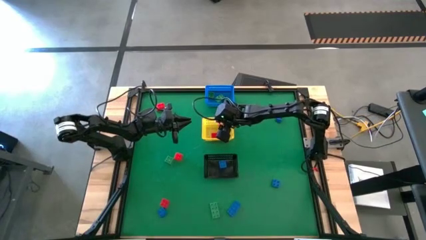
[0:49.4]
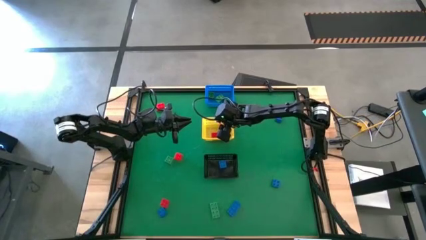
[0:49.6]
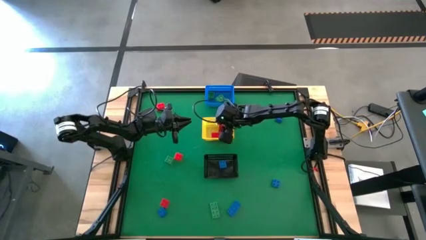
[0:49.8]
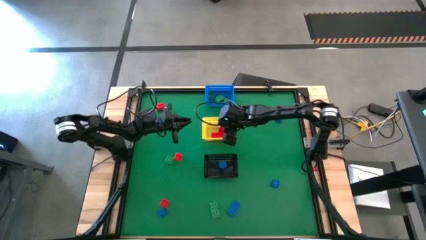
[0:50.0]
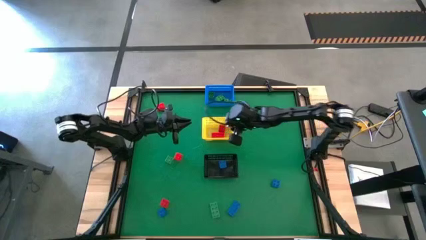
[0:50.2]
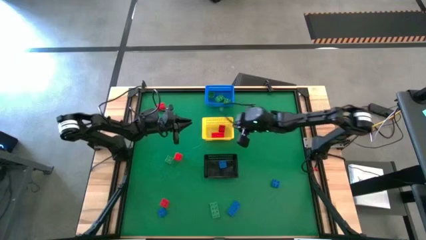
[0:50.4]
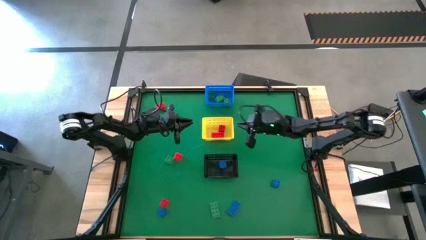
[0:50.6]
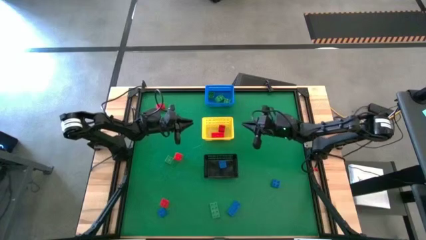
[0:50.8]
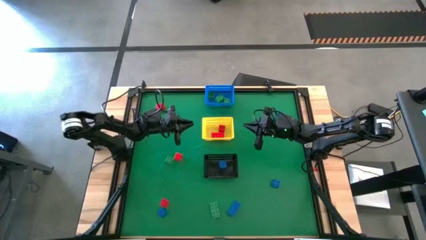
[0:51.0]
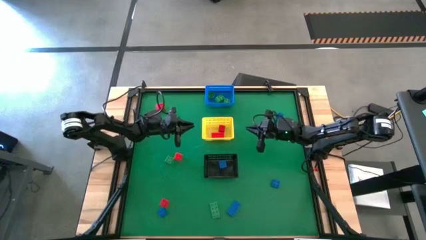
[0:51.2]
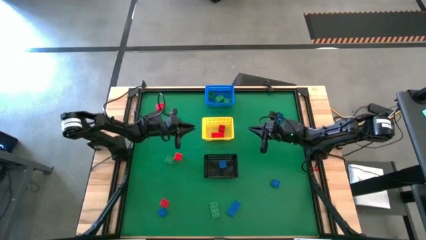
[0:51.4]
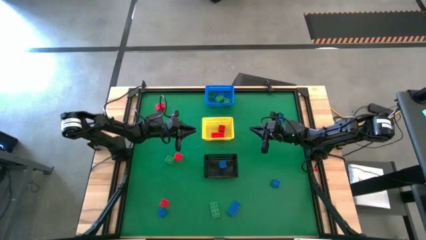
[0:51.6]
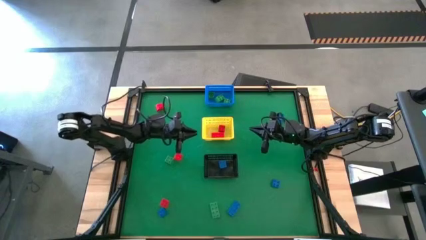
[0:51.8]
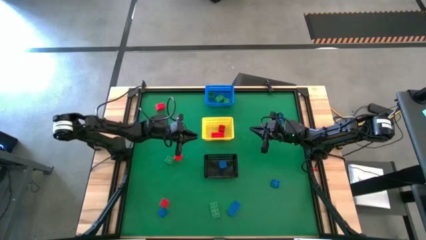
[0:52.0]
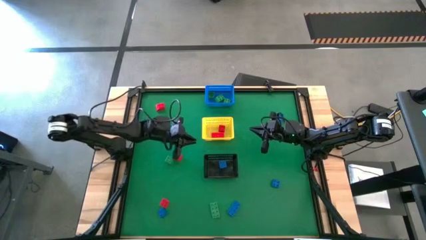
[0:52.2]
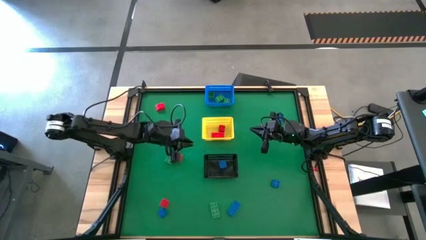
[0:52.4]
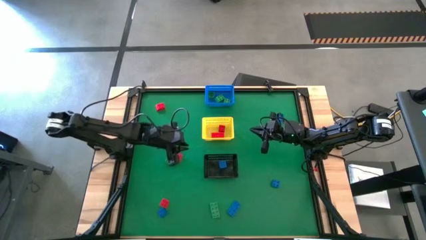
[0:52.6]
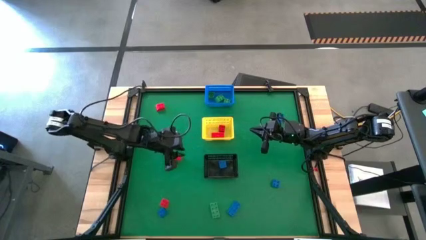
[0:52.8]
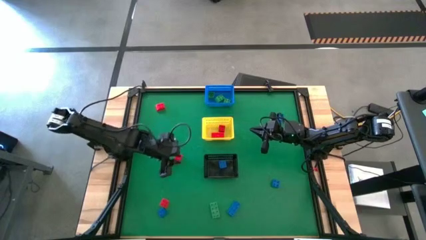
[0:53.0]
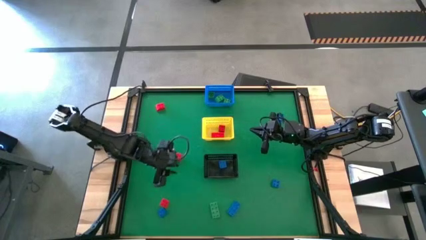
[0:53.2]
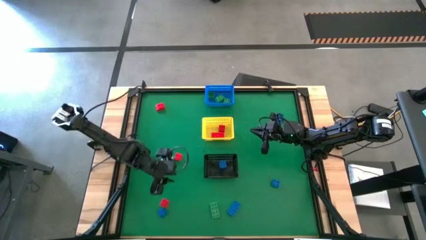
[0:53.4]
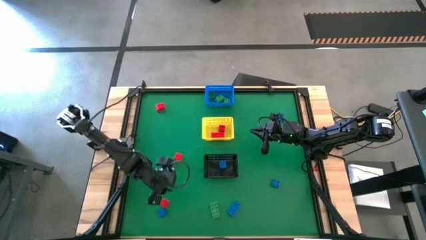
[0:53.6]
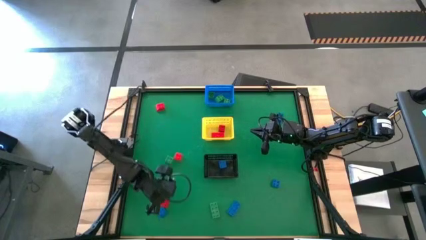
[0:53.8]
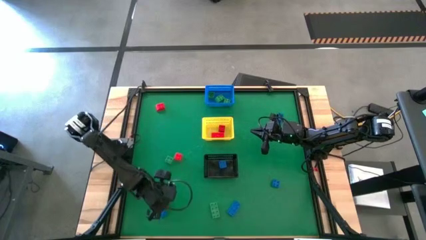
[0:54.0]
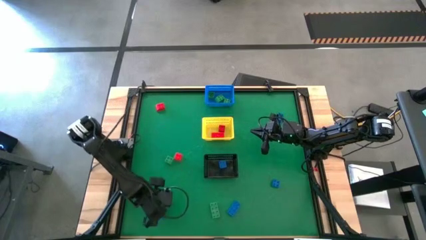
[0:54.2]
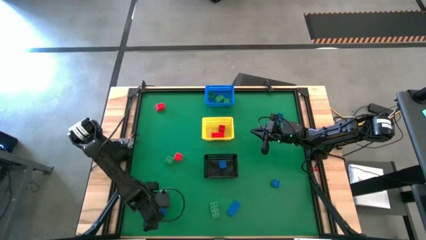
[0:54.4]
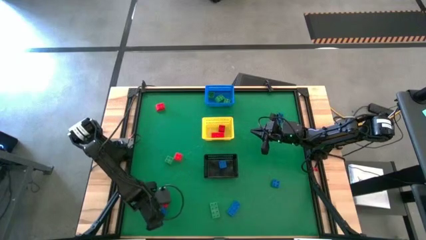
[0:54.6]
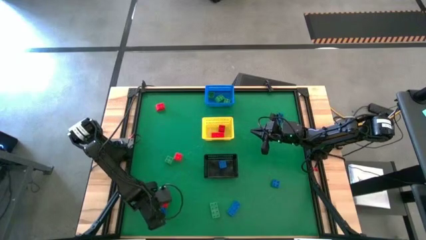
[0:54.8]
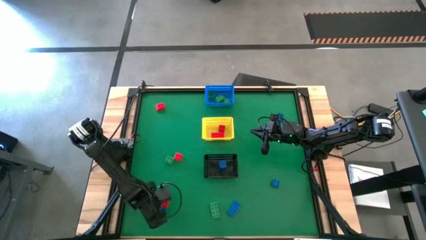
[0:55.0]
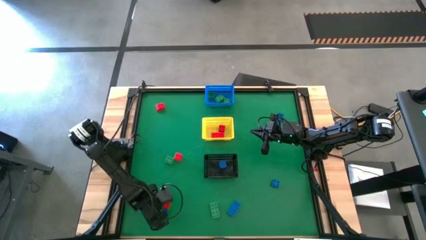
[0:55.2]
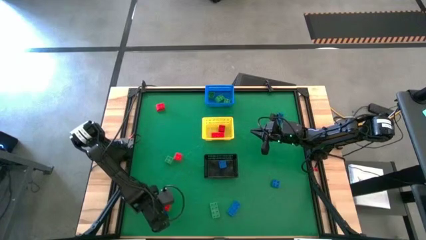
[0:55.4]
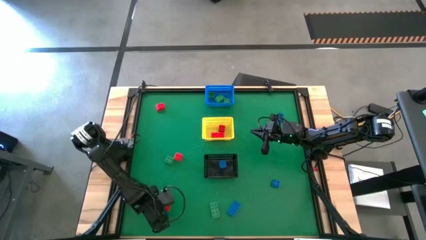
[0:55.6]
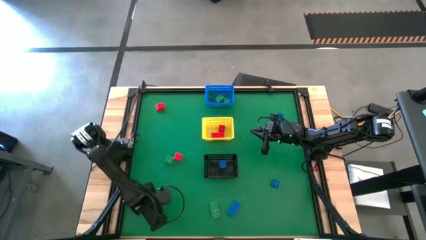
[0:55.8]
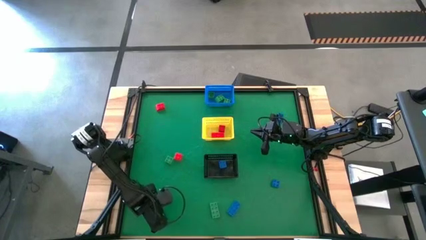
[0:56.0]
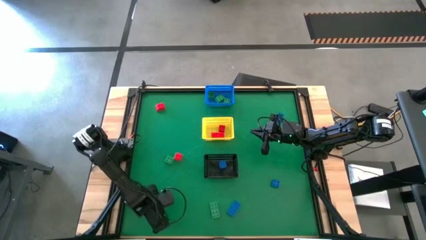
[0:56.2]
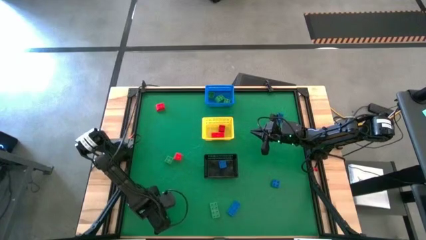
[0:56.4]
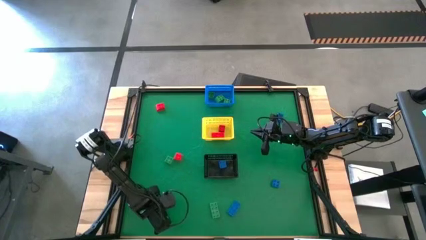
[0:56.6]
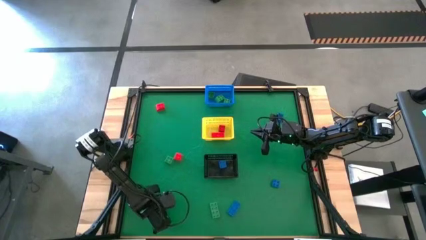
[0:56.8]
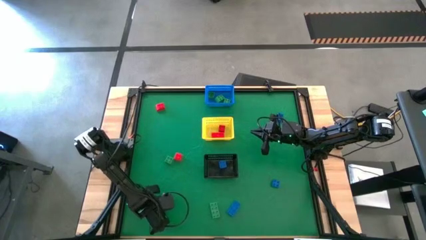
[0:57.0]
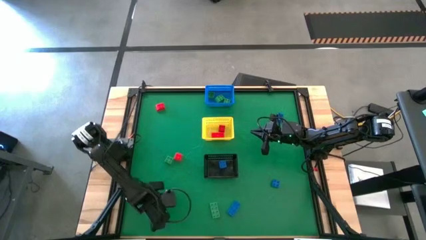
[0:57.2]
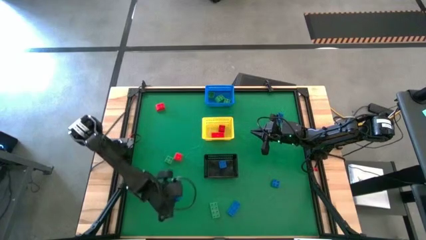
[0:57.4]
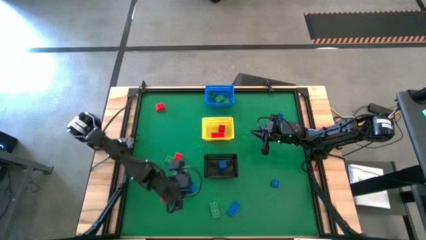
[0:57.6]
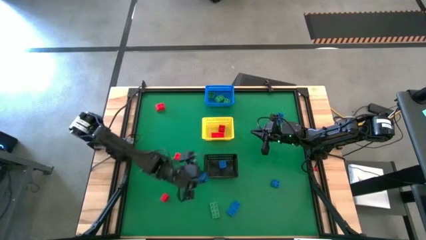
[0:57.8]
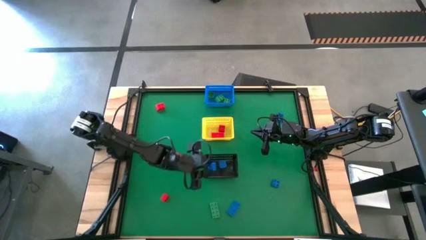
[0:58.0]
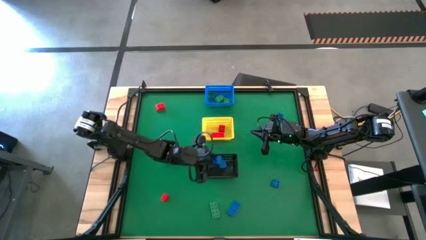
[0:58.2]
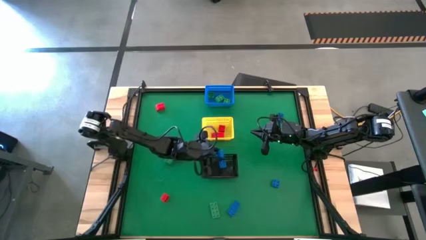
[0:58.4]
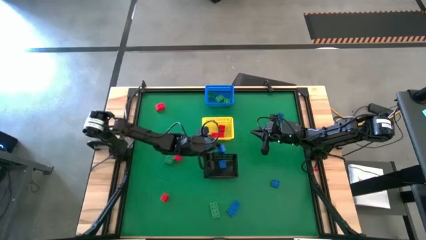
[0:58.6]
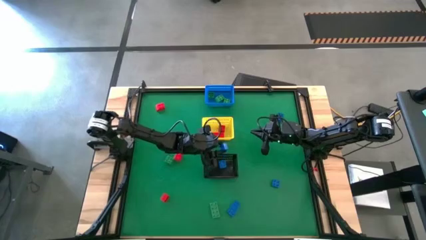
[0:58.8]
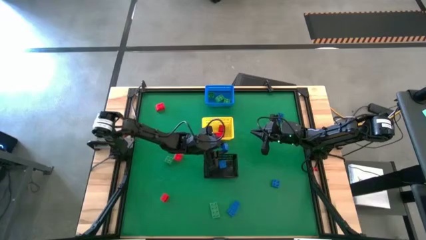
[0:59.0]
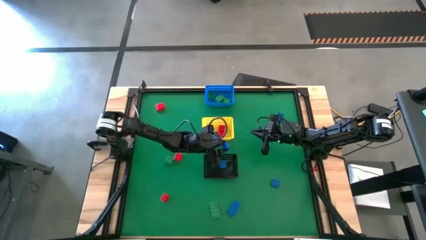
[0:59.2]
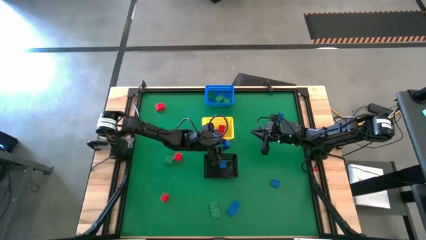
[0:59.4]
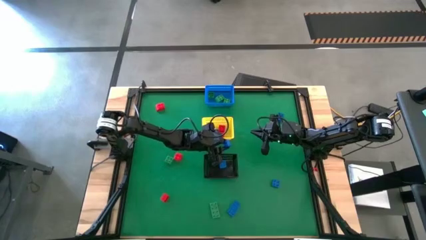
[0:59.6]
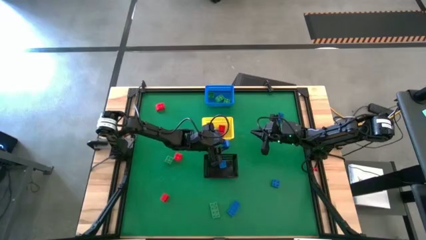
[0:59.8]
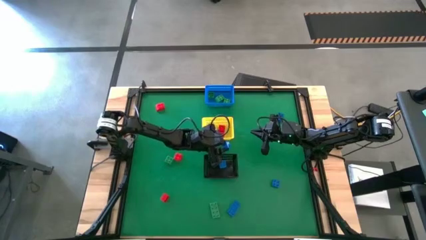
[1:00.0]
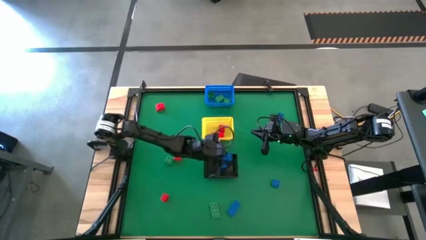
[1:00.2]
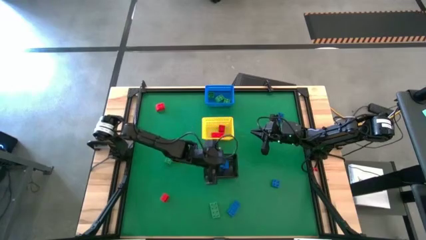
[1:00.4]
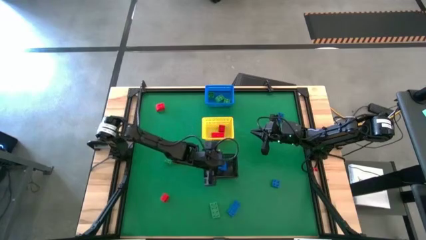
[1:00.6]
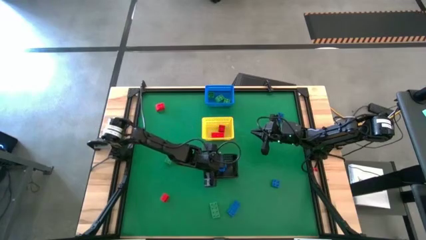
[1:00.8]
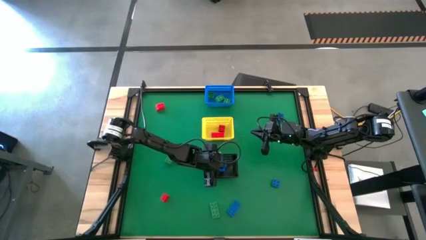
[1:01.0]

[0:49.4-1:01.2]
Task: Sort & place blocks by color
Put the blue game piece into the black bin

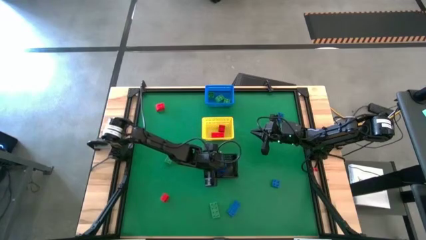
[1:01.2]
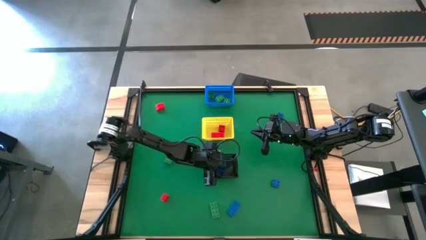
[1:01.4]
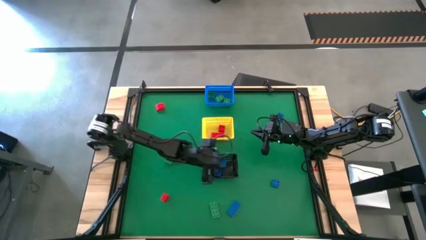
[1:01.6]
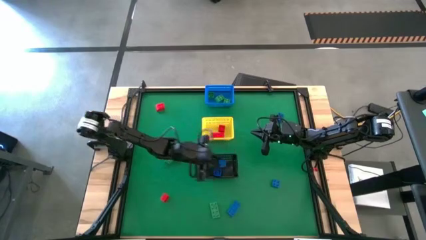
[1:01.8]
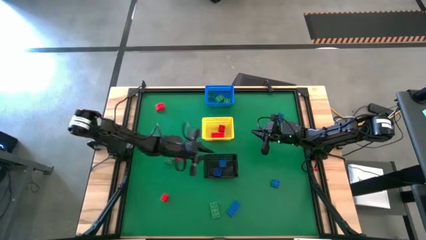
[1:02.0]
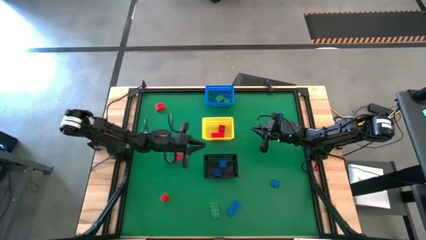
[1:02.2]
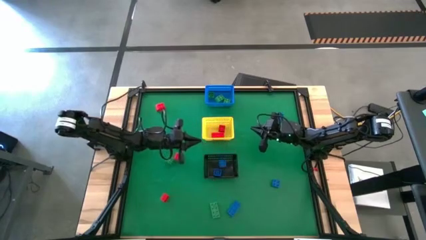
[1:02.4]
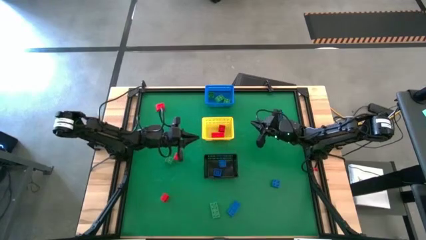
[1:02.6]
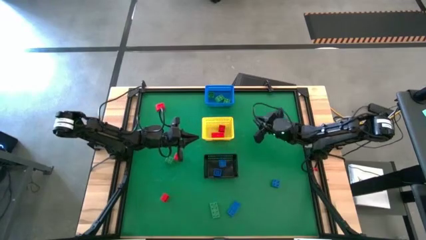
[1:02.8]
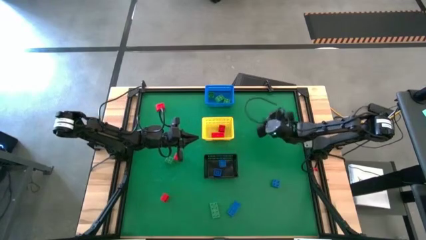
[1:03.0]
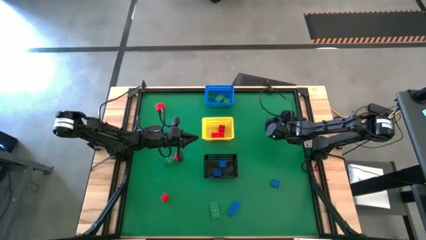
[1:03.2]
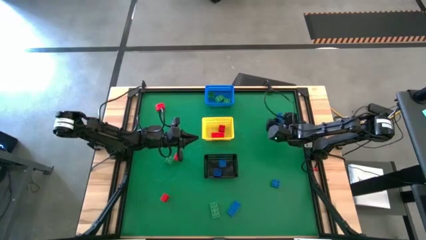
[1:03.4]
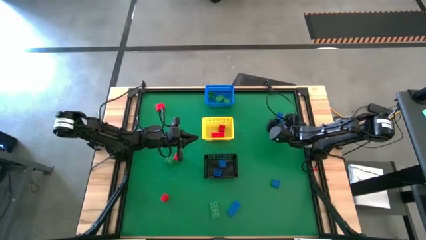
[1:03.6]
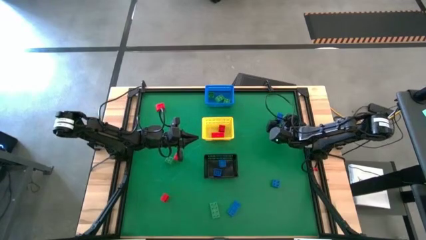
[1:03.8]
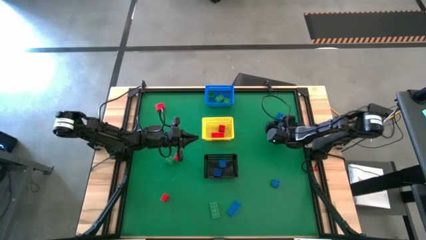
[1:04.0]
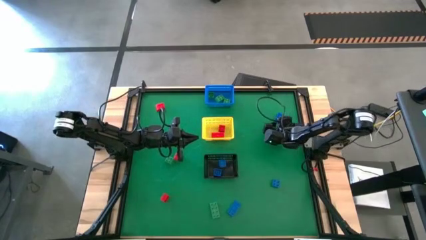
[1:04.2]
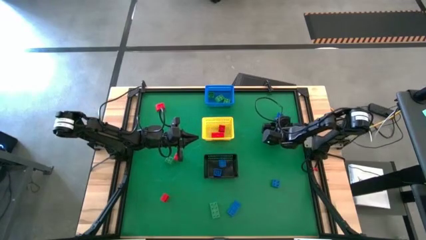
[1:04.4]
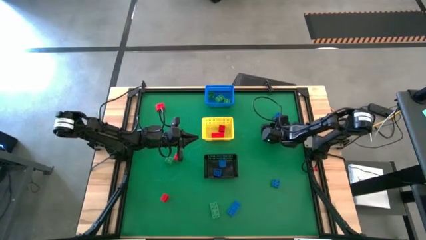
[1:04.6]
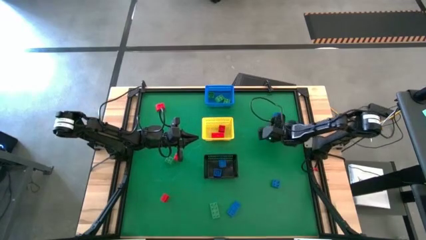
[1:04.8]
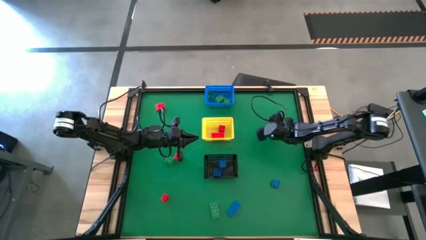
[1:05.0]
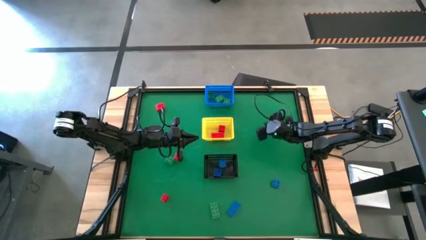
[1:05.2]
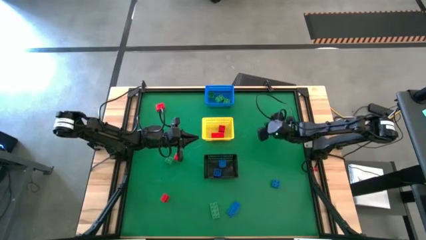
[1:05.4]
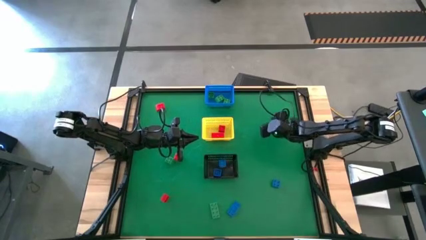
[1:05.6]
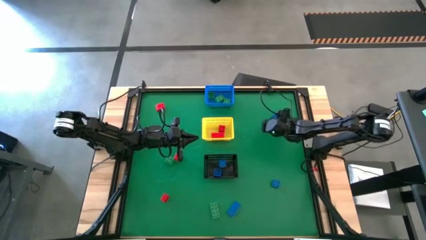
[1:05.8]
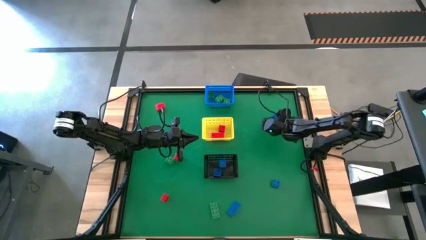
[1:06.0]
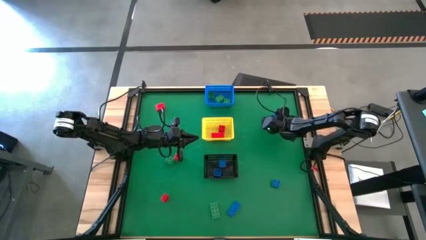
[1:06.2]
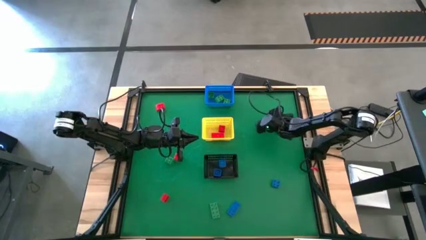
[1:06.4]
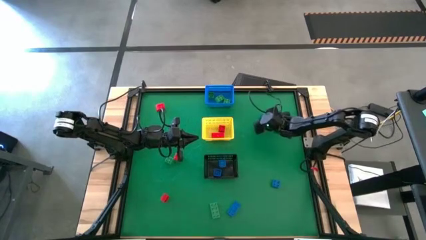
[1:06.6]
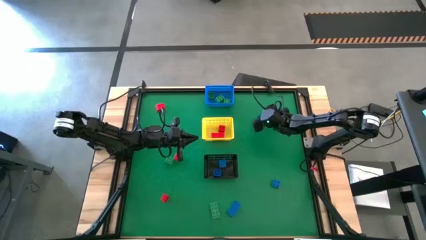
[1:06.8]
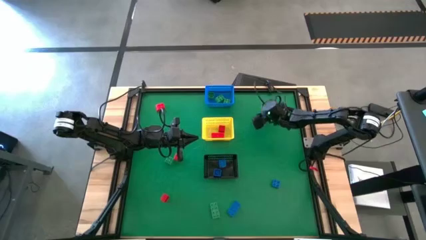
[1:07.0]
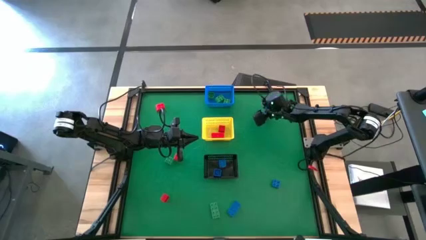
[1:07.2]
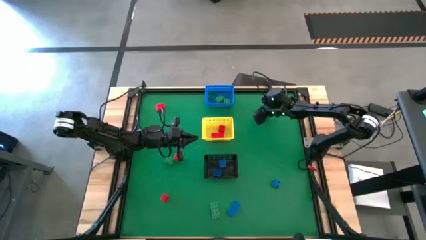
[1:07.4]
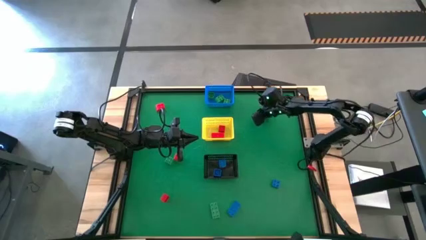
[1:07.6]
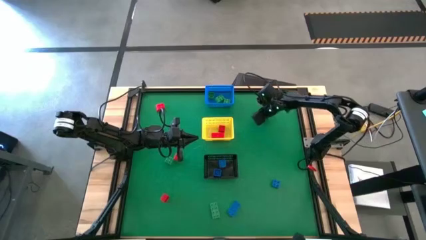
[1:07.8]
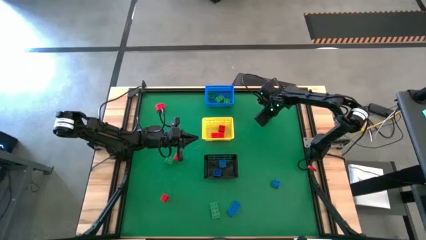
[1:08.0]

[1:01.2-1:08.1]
Put the blue game piece into the black bin
